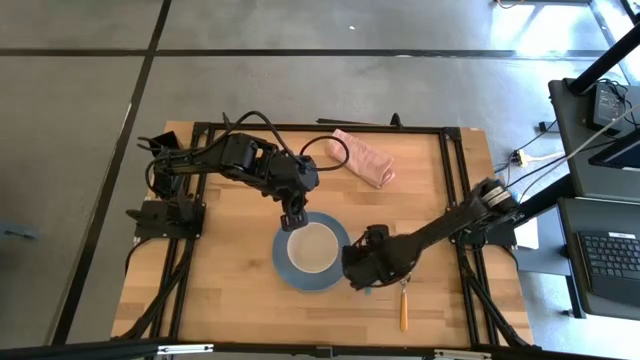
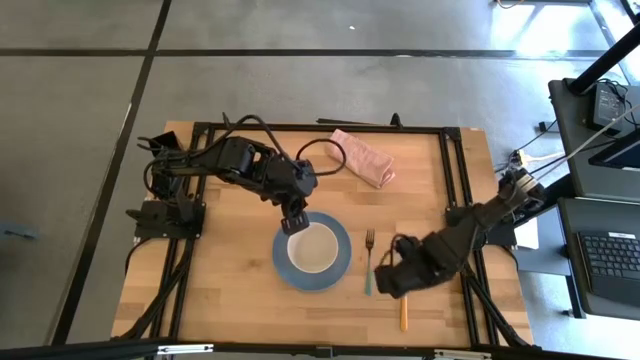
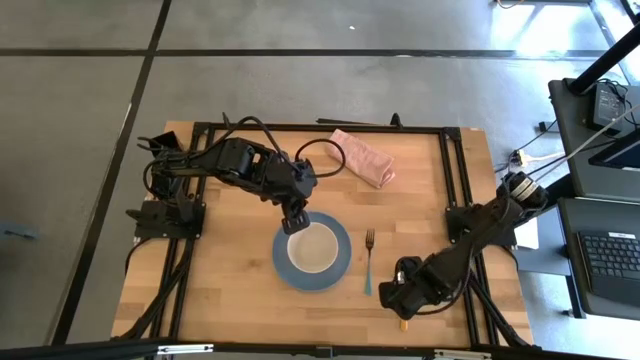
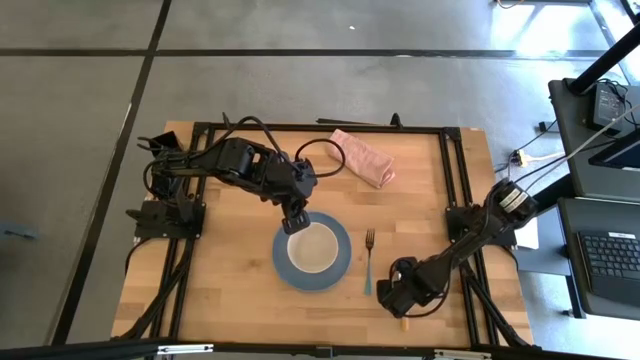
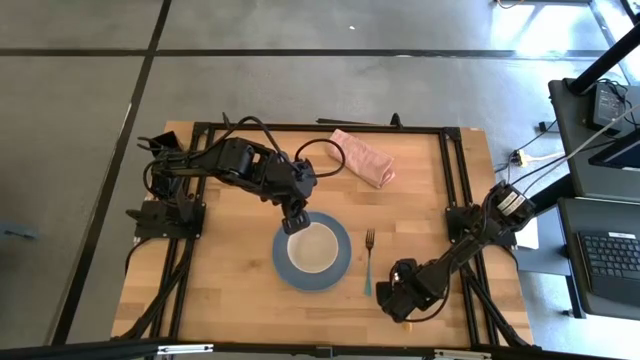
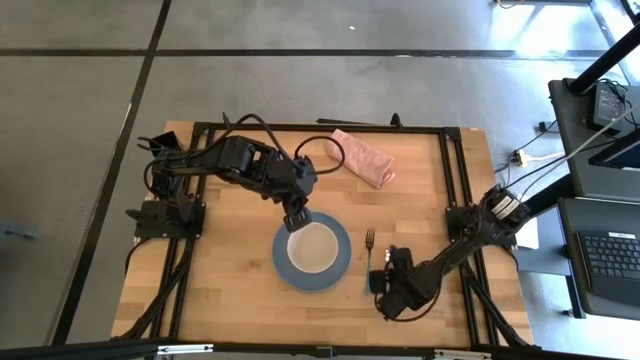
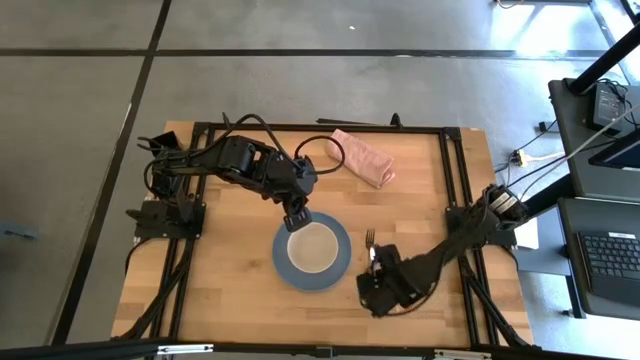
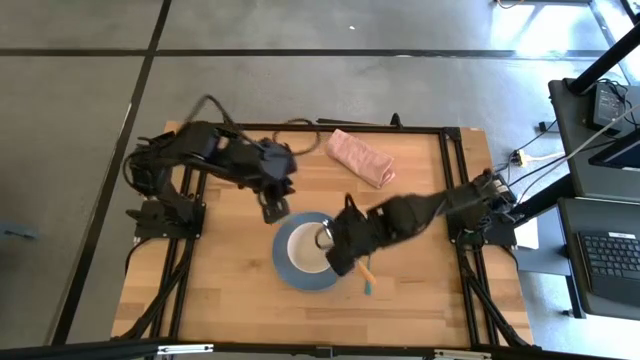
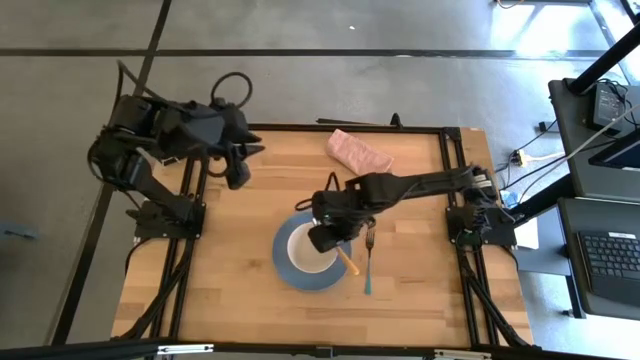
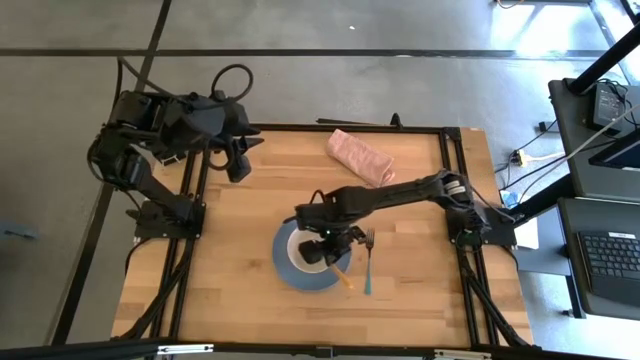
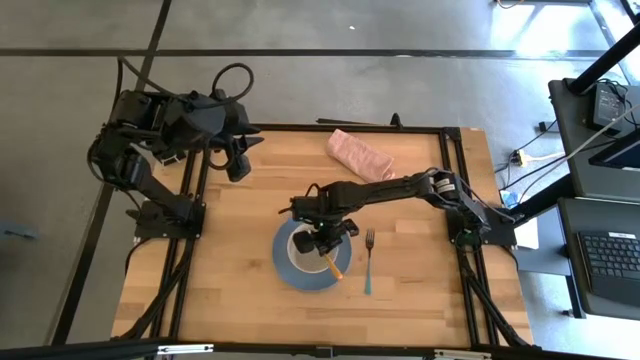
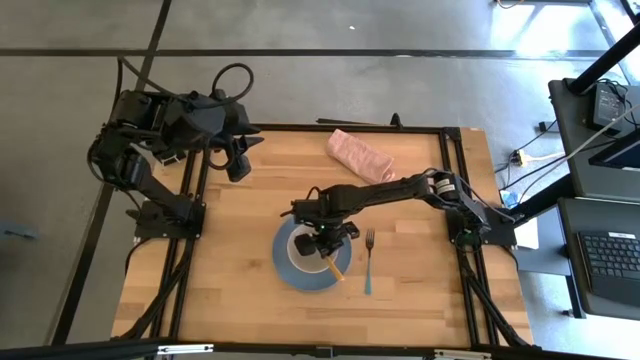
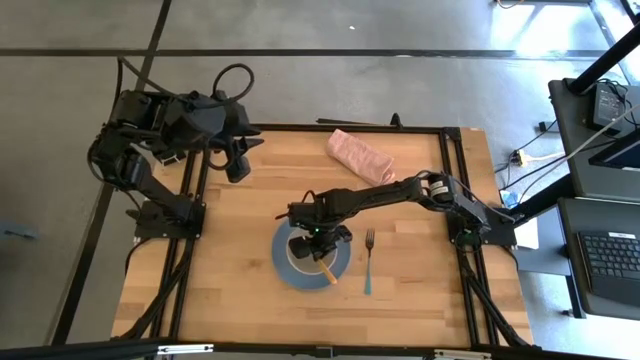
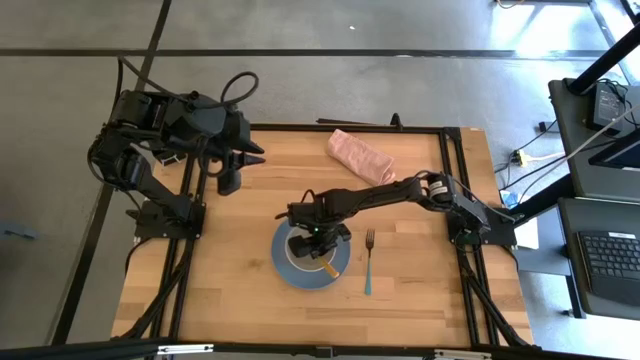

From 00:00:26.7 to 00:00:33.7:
Task: Set table place
Put the orange spoon into the white bowl

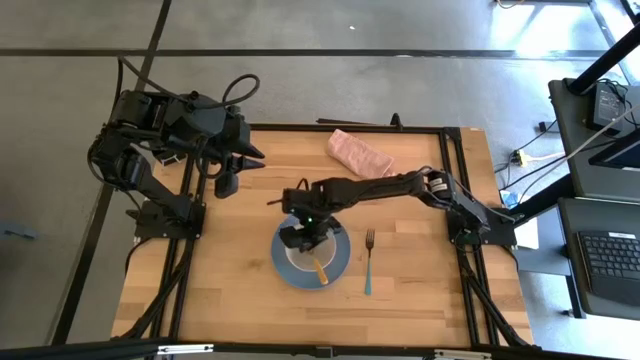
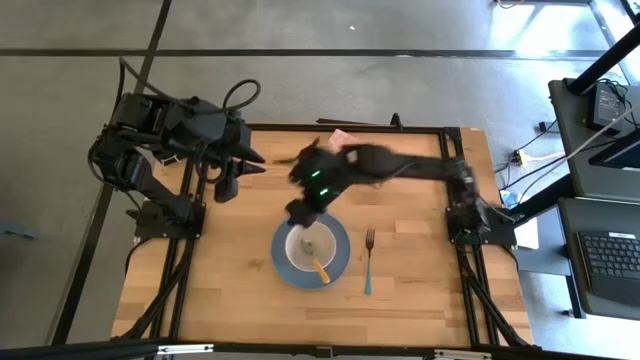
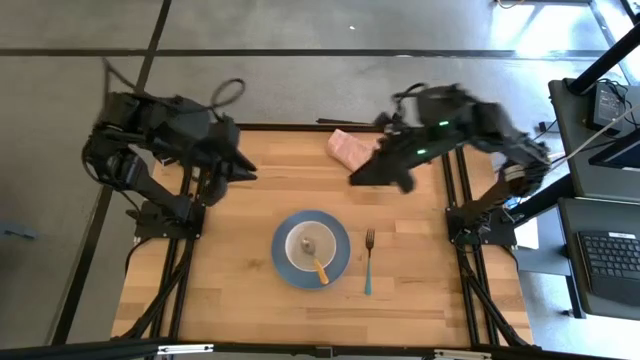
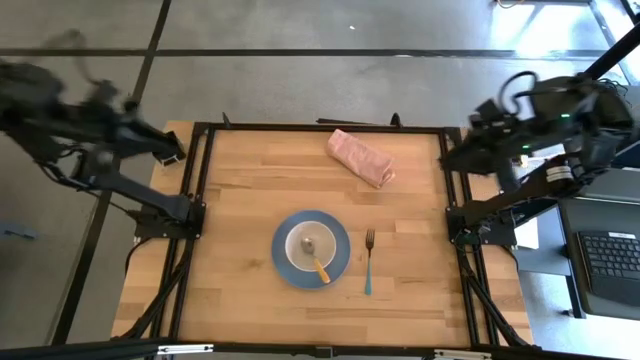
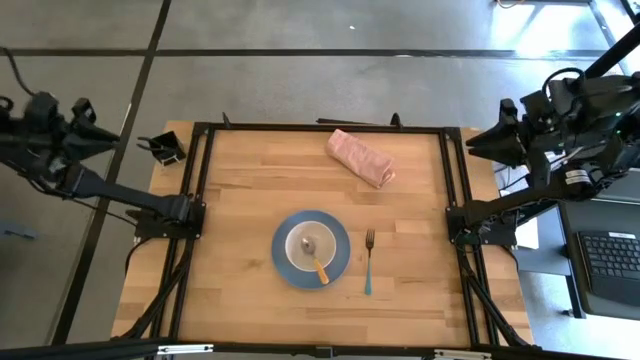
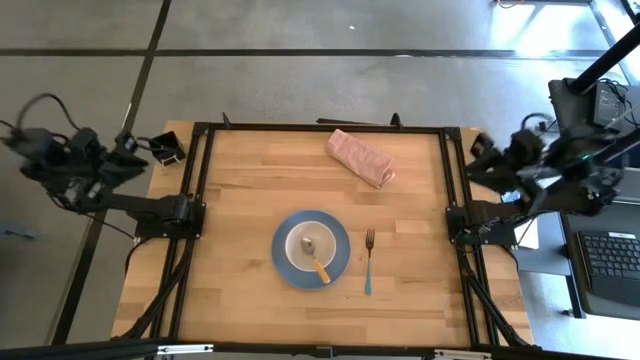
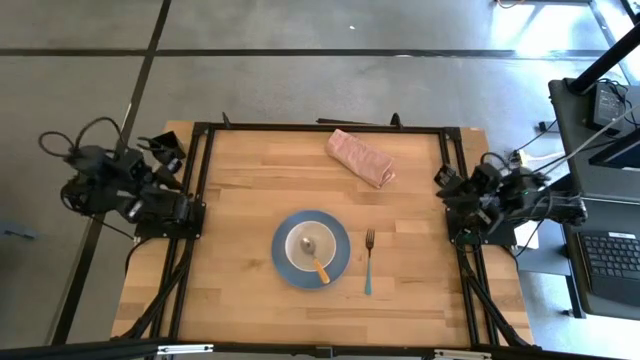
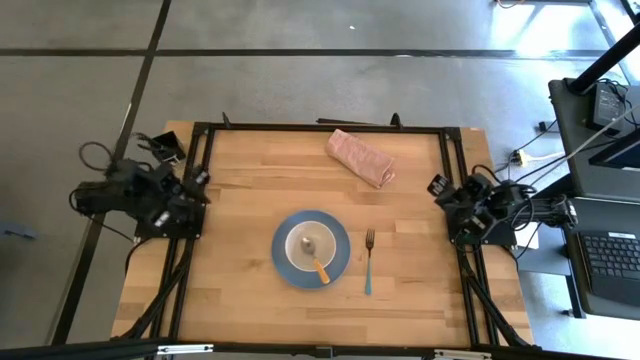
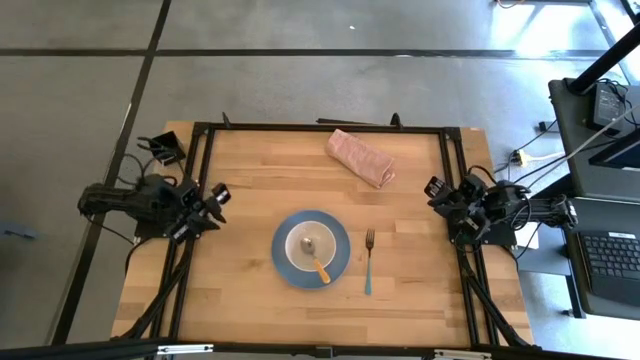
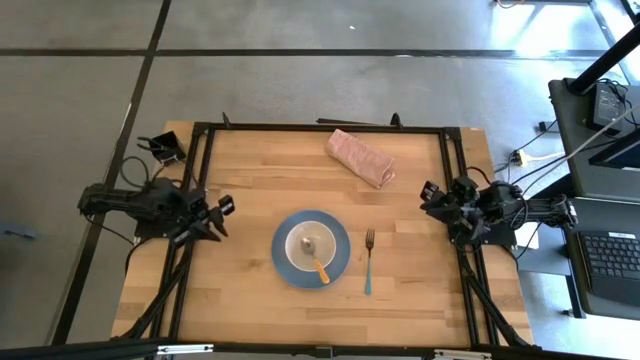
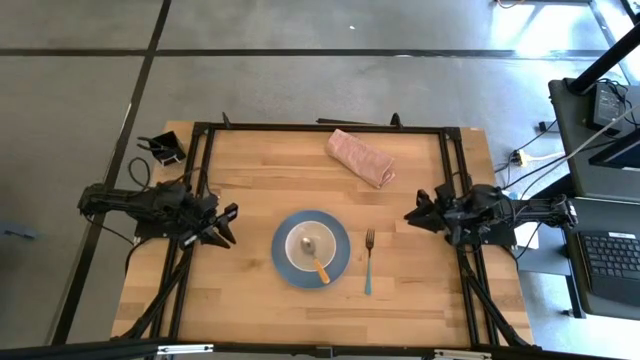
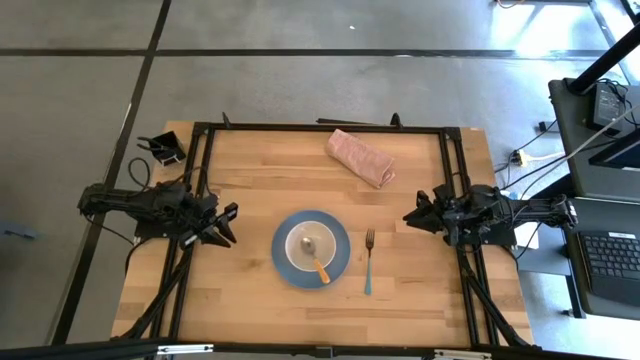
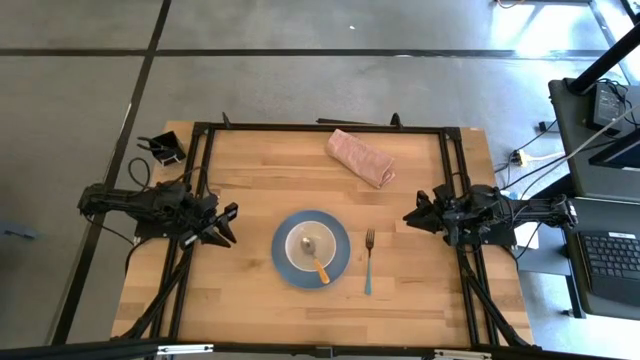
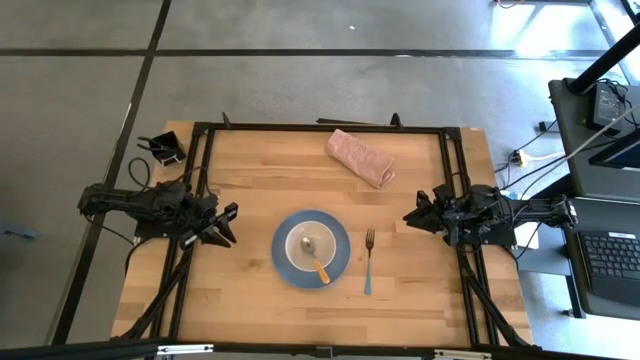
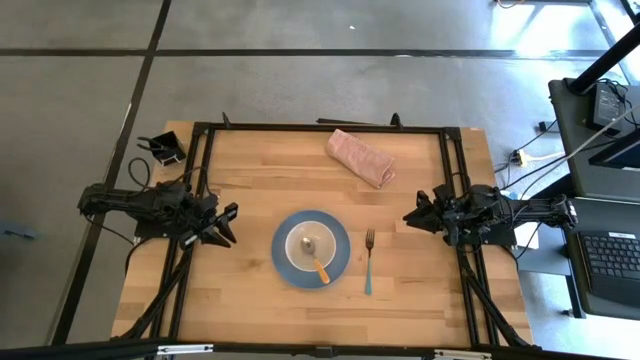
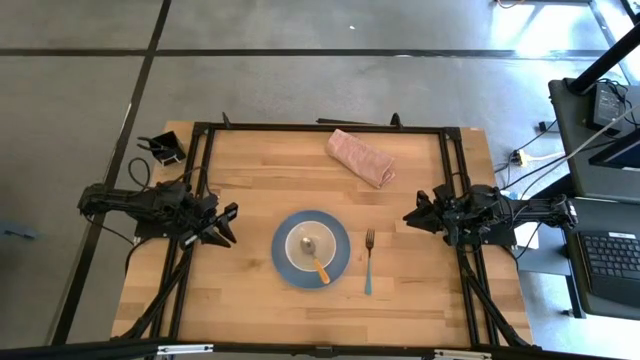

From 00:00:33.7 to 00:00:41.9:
Return to Home Position

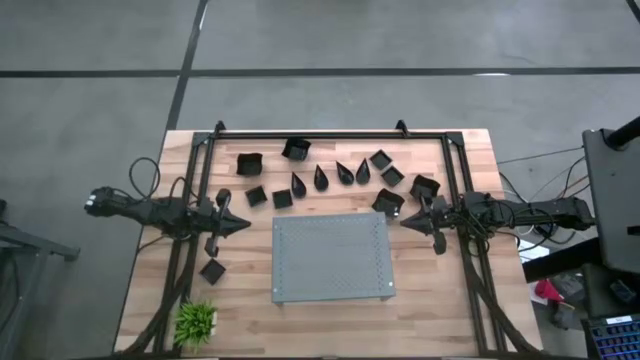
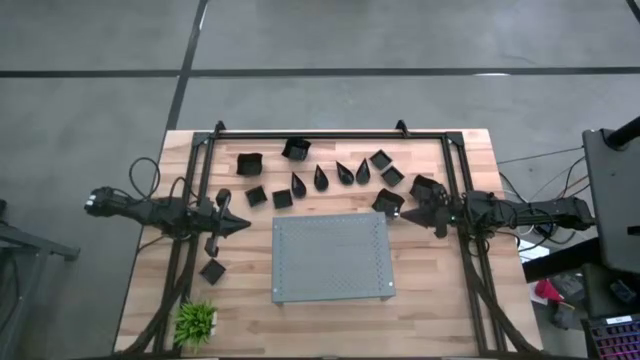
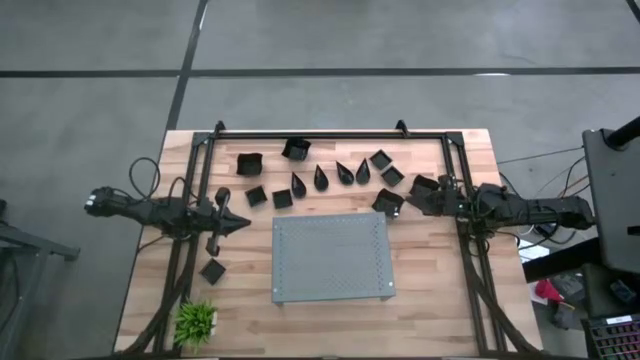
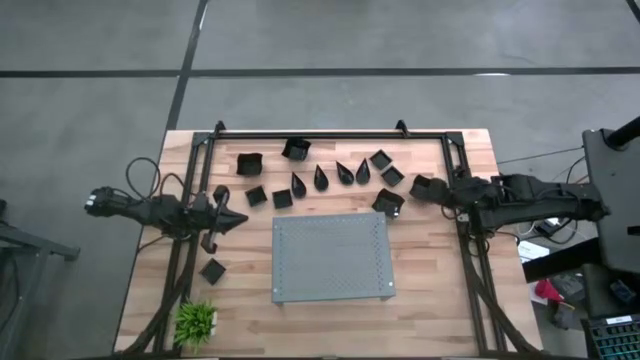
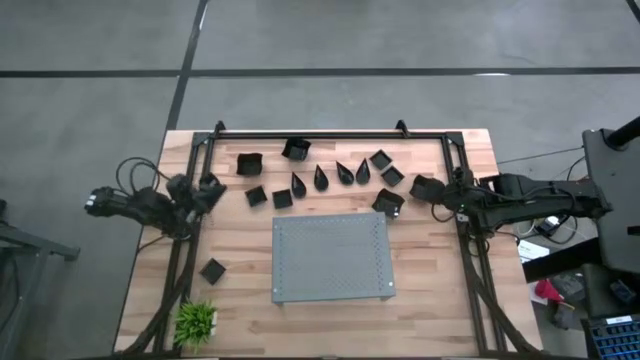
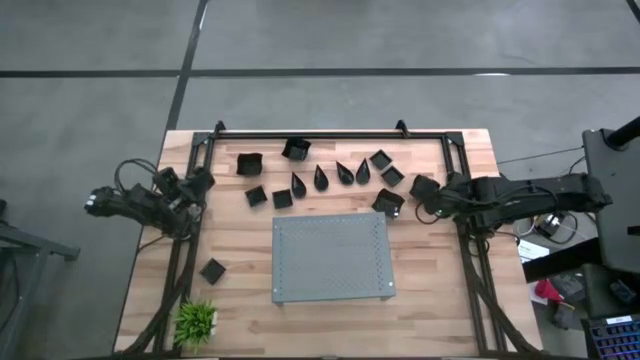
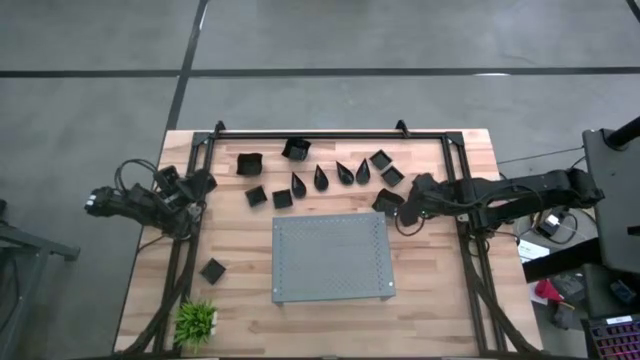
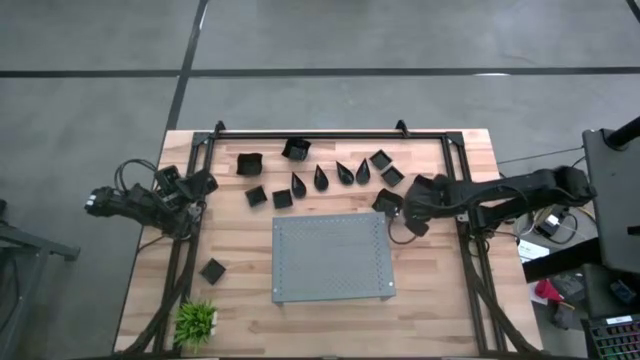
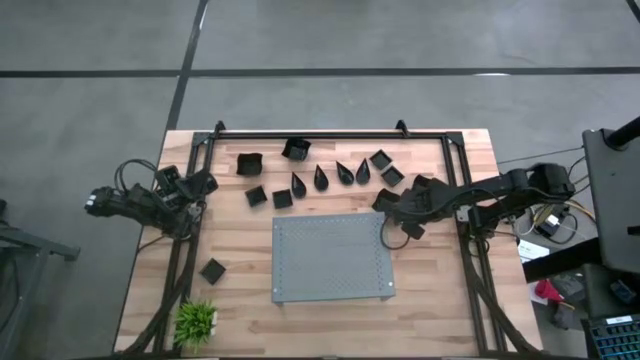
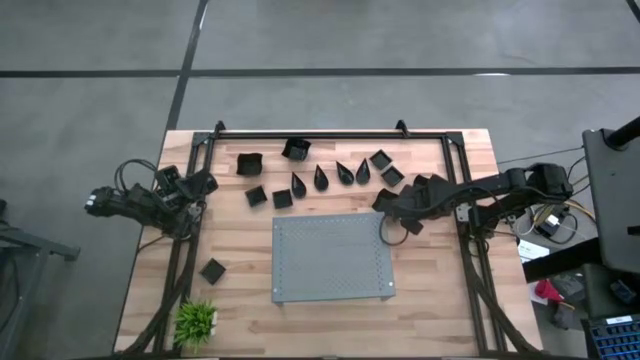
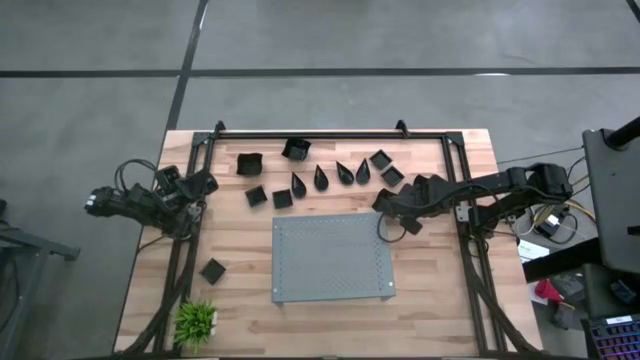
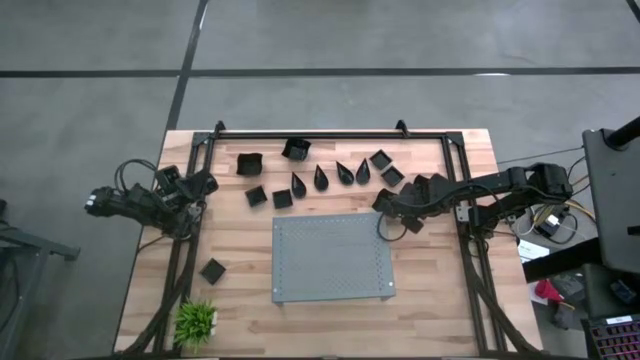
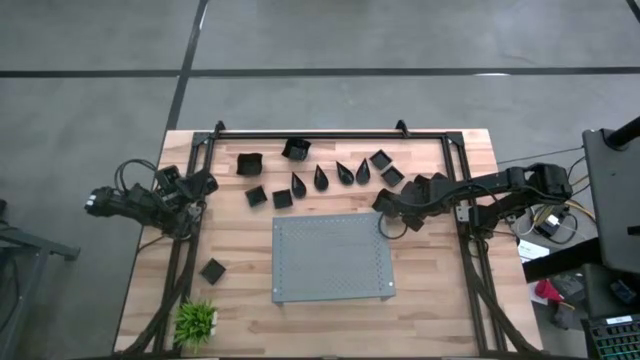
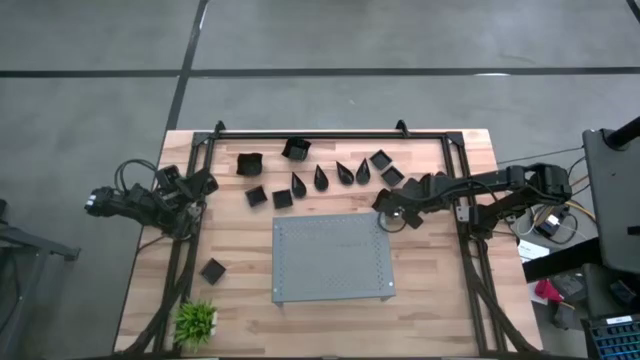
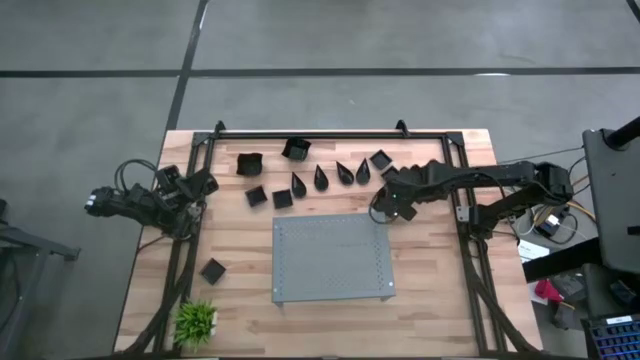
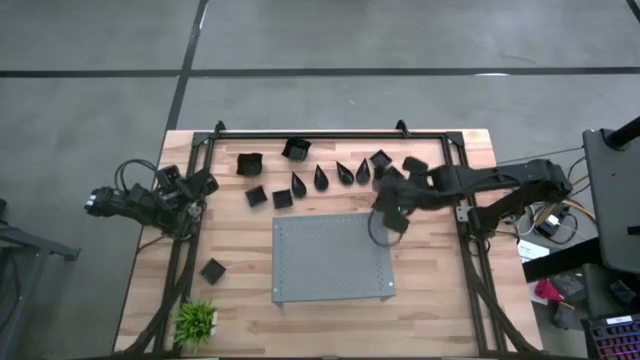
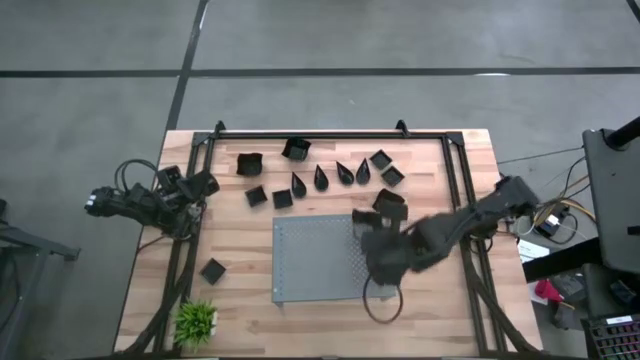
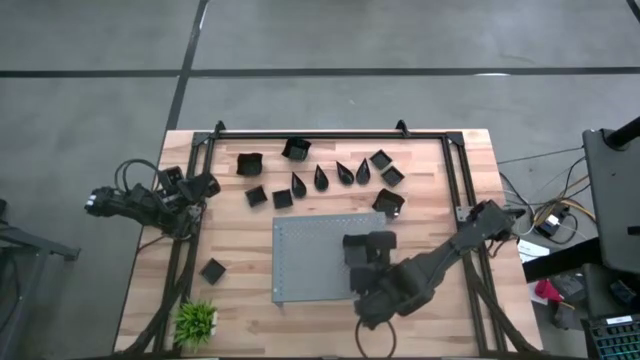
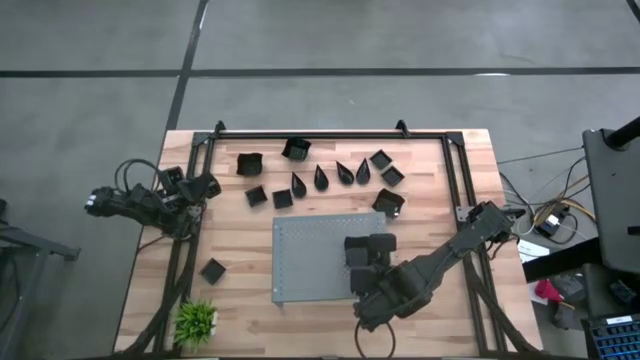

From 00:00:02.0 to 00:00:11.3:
Task: Pick & Place Mini shaped plates
Put the distorted square plate on the shelf
